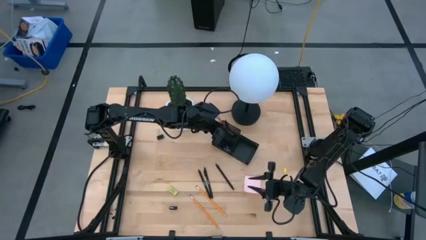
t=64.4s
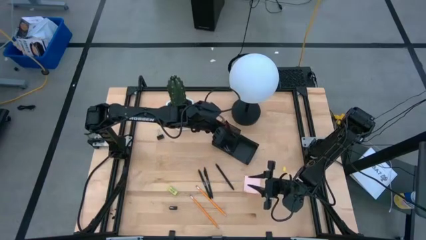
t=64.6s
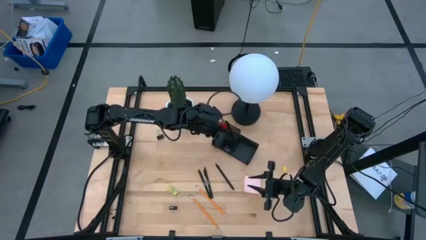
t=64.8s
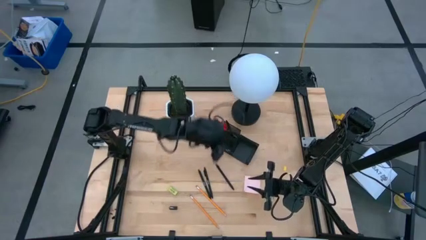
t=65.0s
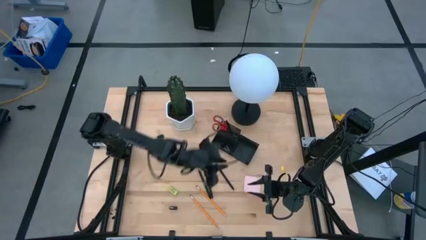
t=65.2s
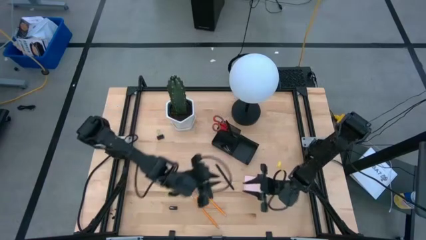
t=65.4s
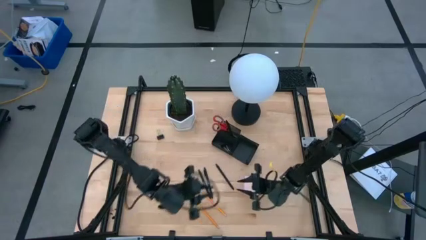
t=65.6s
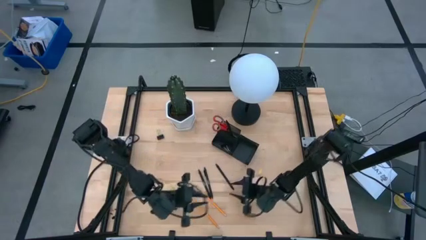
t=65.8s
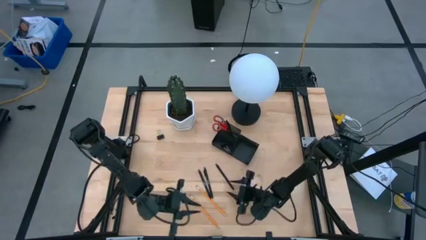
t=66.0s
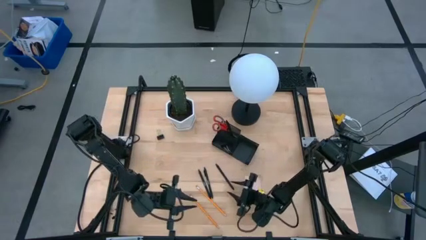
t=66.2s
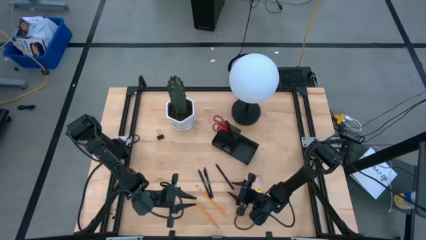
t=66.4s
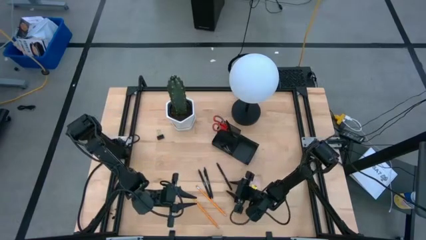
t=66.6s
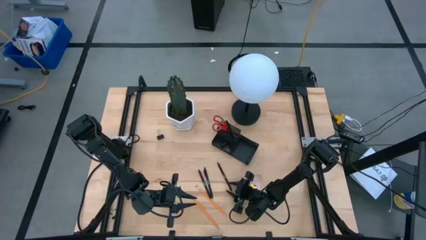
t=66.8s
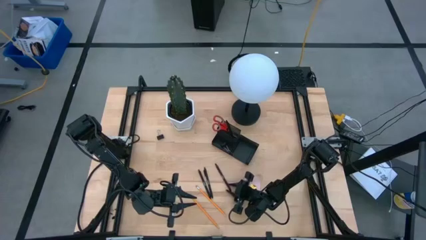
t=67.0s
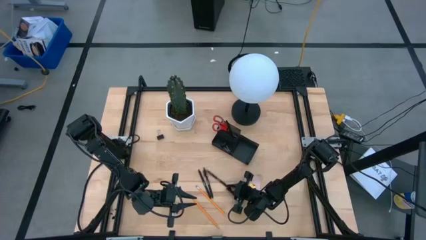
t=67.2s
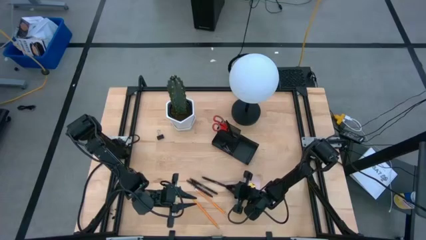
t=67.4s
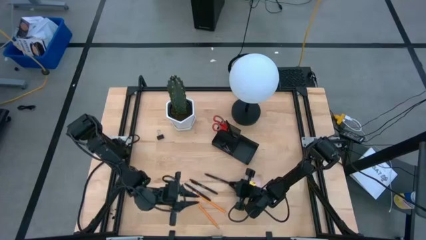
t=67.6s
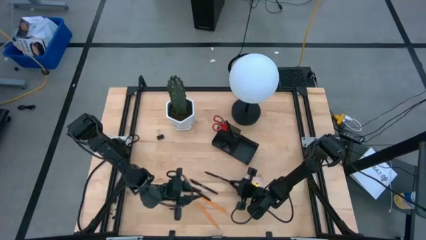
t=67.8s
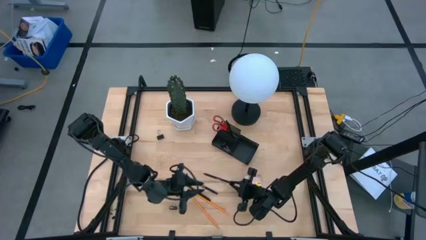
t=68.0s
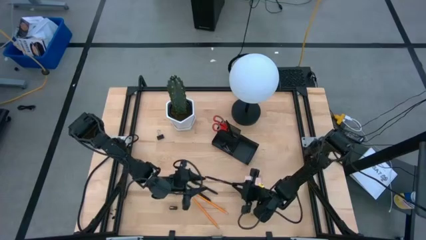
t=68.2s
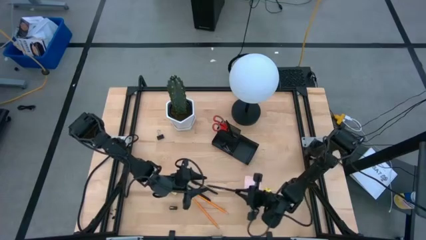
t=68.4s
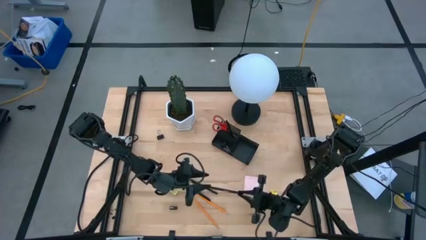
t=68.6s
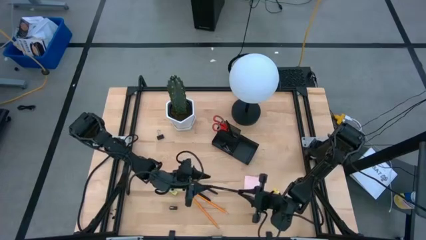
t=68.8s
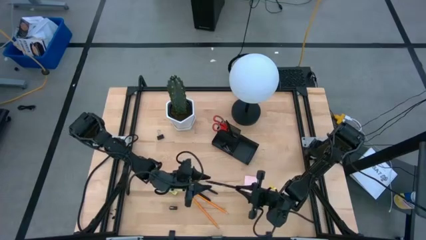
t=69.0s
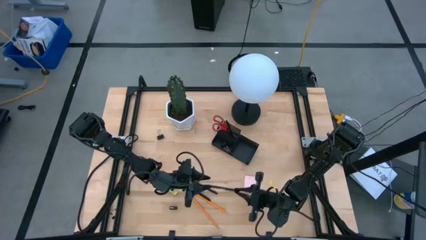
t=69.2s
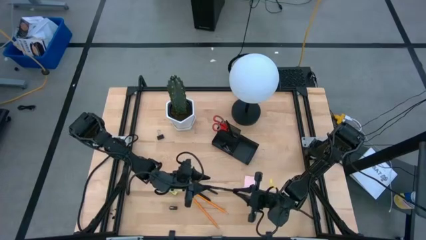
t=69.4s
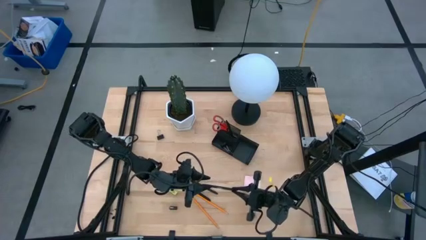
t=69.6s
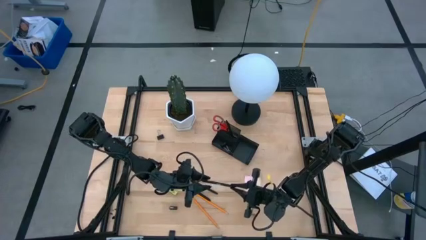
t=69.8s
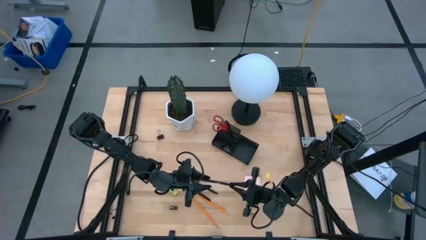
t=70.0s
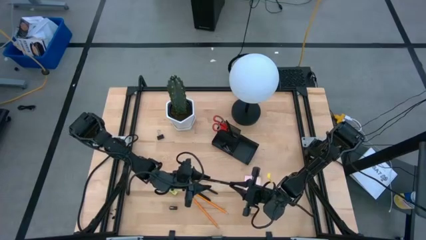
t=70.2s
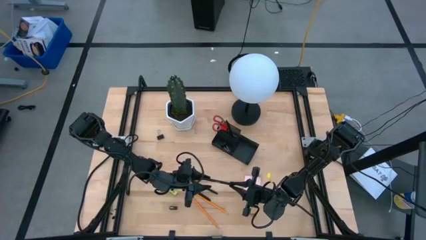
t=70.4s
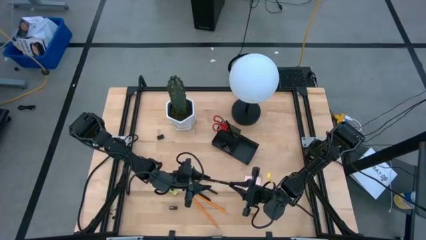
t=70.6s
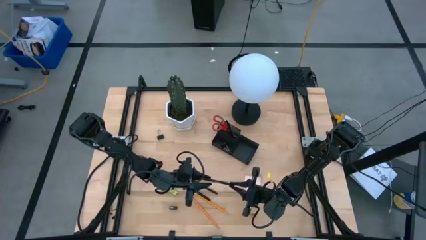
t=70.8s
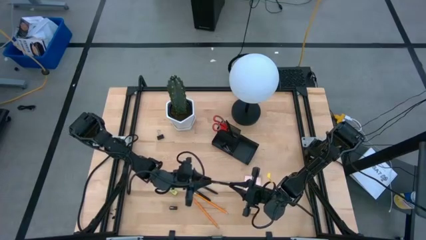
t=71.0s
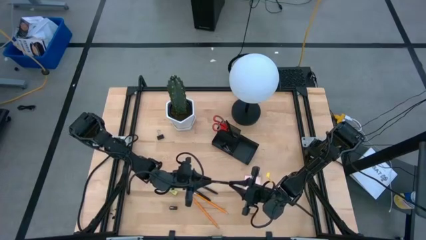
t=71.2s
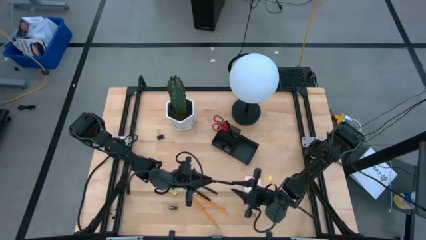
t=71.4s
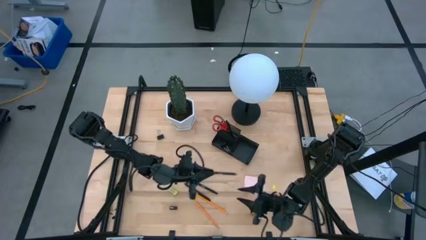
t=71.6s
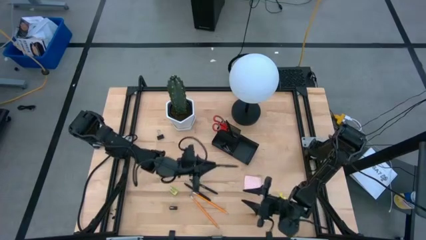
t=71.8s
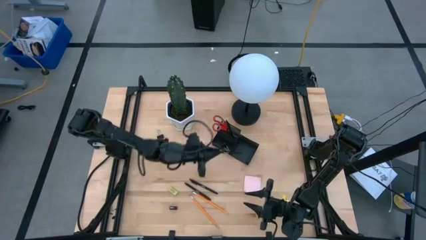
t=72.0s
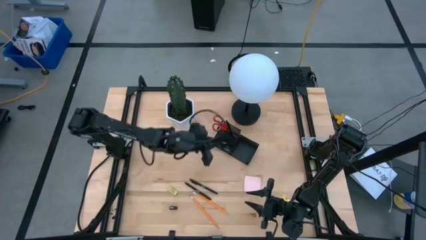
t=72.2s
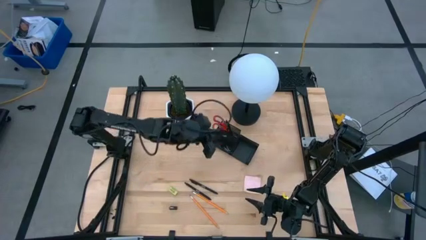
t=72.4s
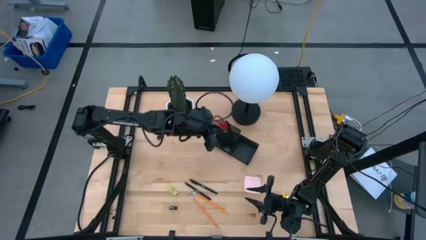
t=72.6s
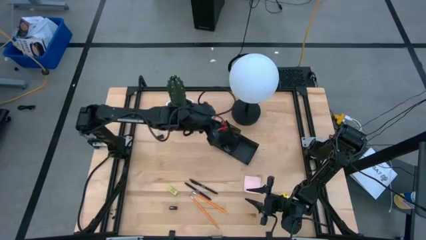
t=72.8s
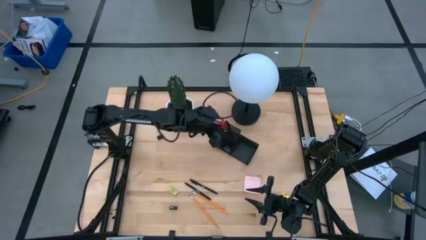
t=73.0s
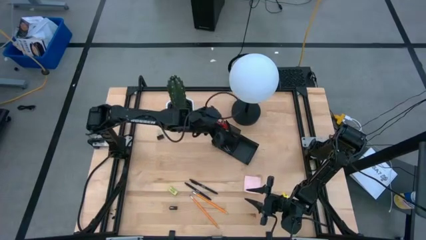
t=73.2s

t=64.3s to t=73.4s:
Task: Pick and place office supplies into organizer
Put the black pen into the black desk organizer

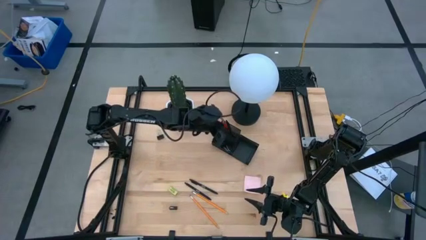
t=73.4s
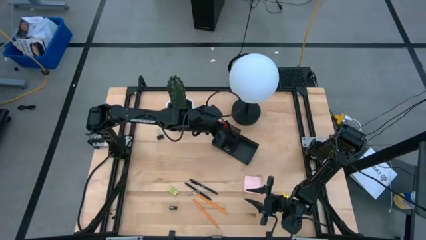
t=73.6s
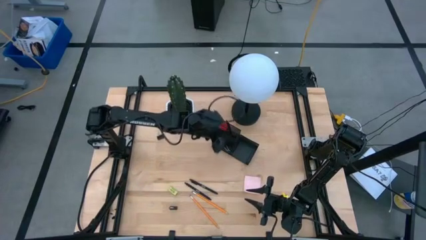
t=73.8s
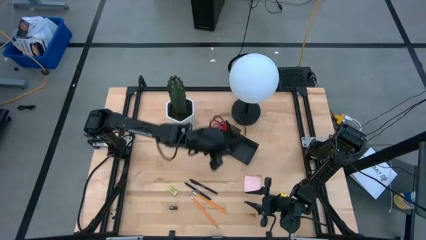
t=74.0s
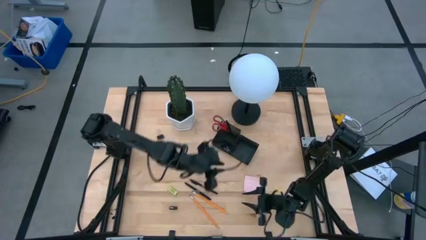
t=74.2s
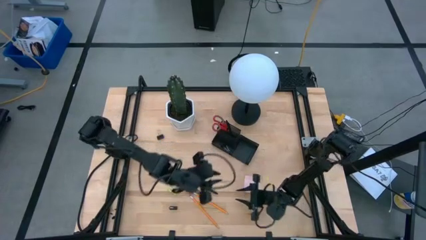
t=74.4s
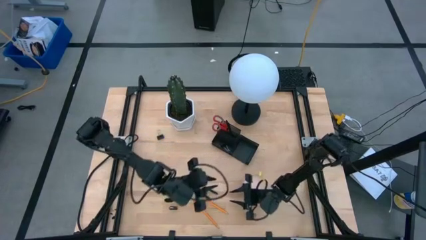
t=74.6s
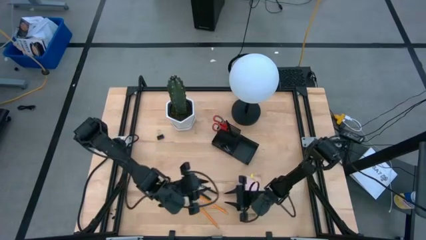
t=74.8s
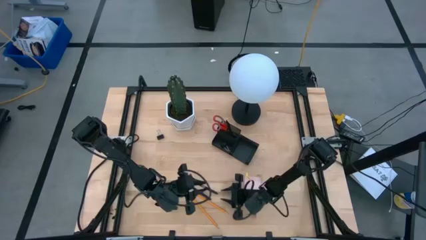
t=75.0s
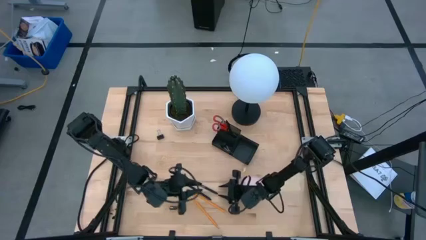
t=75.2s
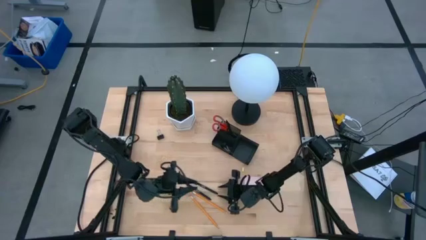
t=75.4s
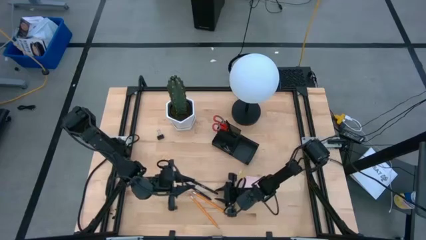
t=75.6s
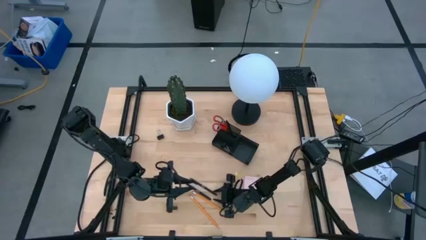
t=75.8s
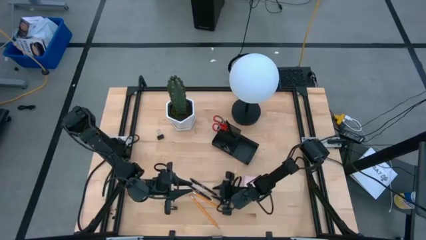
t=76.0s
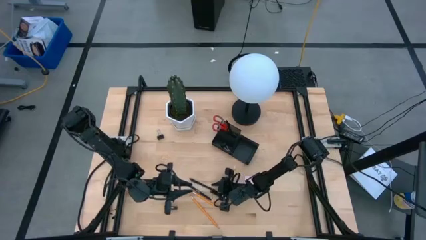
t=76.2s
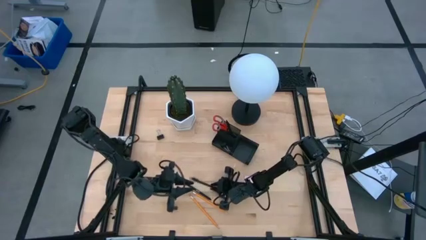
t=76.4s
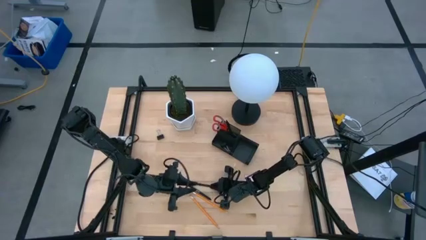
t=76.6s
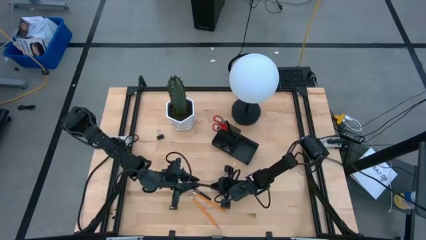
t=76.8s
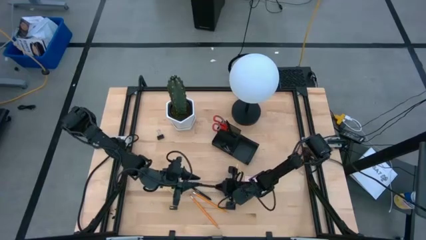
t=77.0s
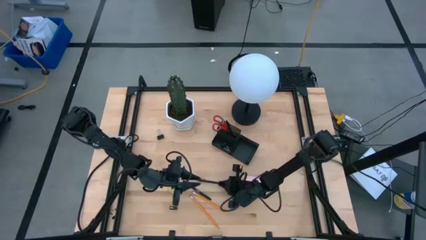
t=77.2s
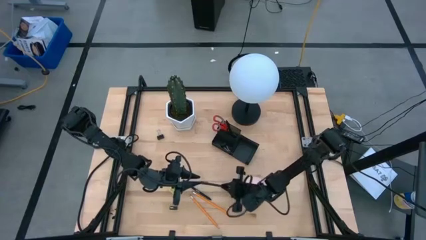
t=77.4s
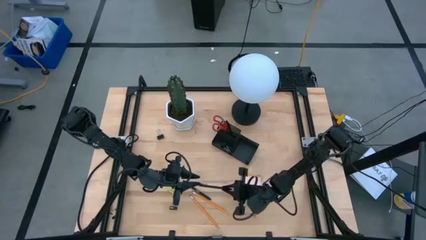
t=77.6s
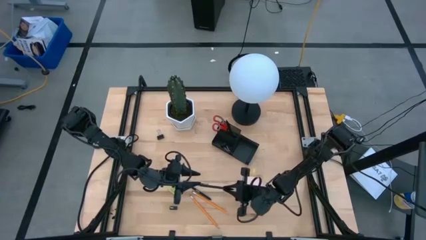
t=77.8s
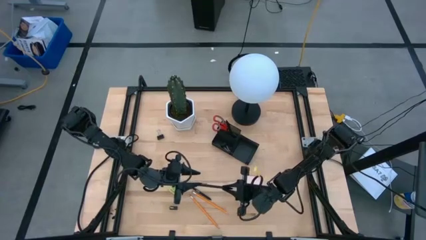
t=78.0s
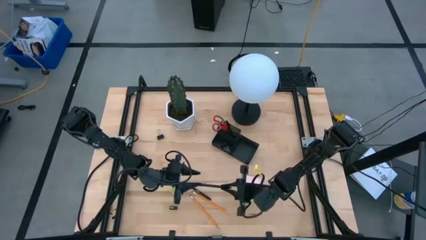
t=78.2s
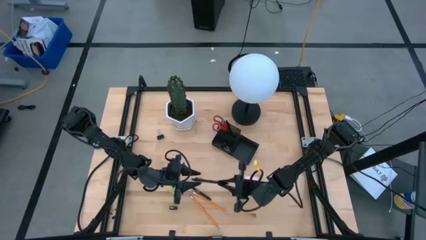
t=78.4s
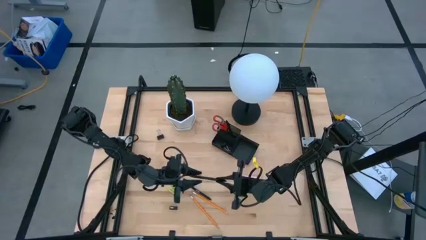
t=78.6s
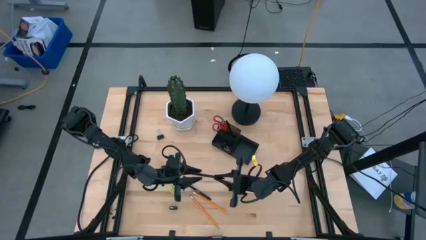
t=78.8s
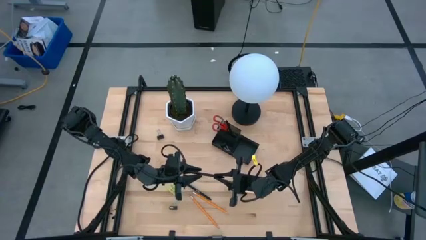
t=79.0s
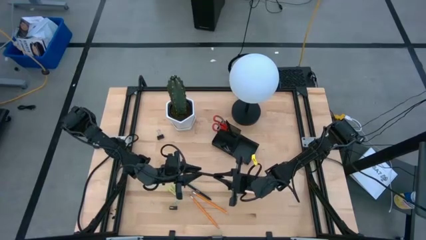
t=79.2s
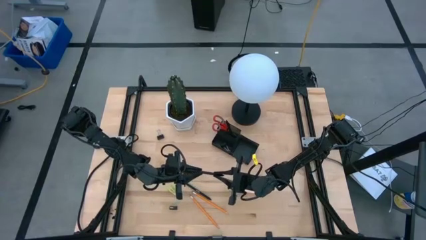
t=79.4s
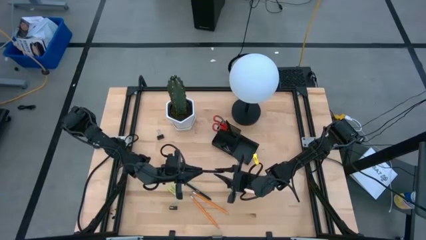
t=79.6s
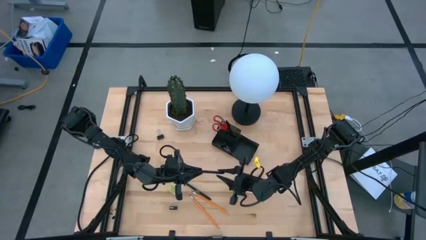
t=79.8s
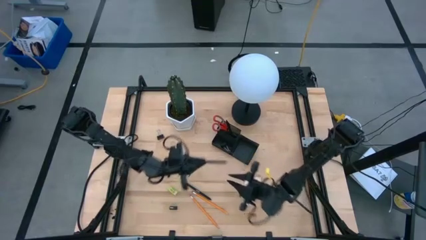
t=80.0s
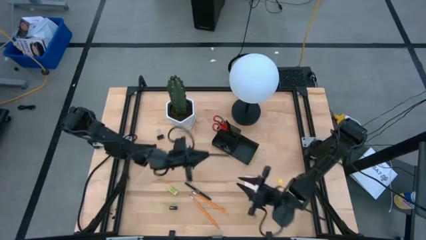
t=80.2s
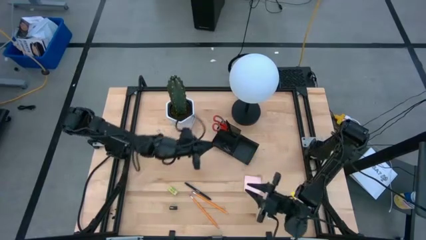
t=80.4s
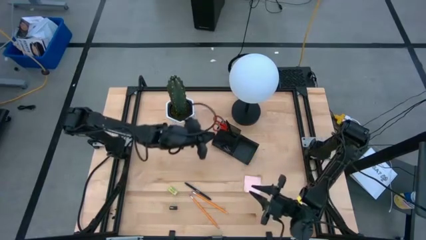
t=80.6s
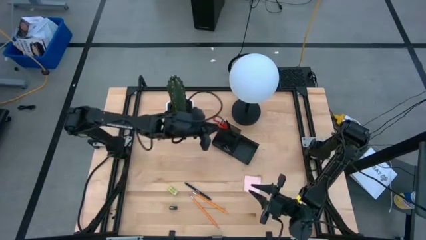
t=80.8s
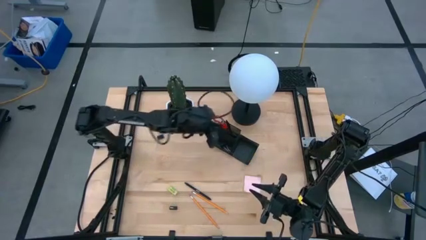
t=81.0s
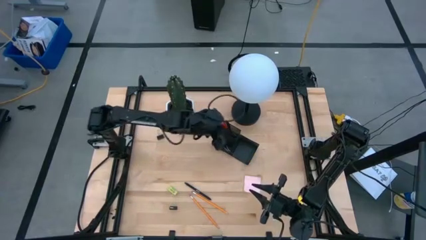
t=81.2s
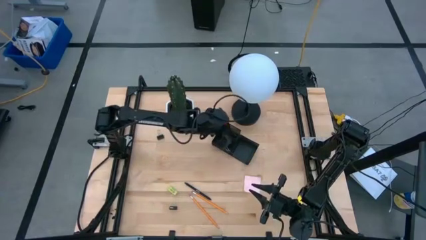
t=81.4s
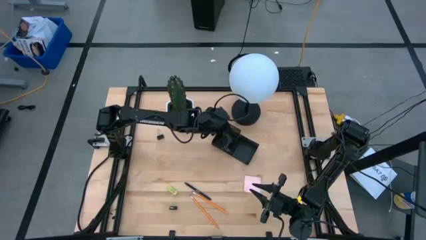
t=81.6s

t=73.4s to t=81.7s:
Put the black pen into the black desk organizer
